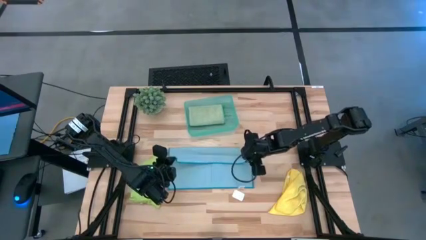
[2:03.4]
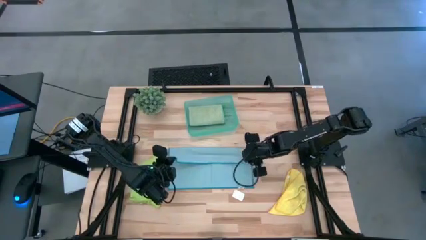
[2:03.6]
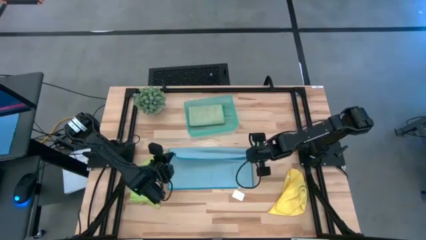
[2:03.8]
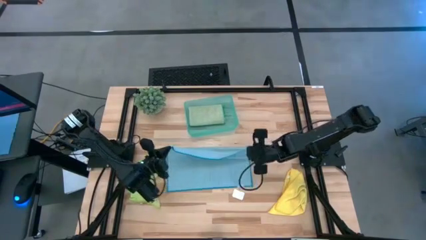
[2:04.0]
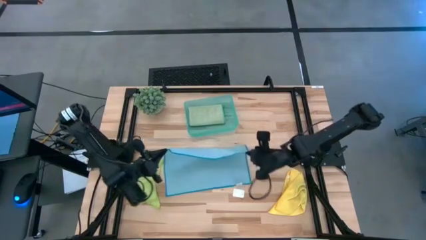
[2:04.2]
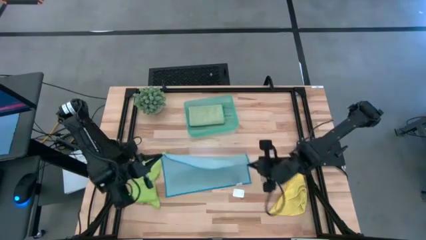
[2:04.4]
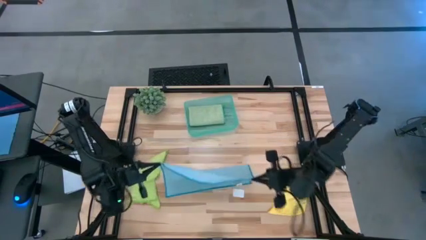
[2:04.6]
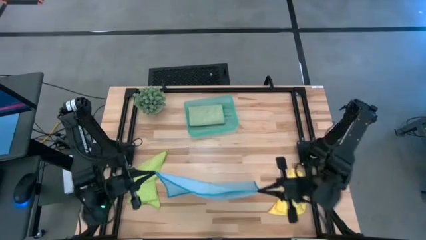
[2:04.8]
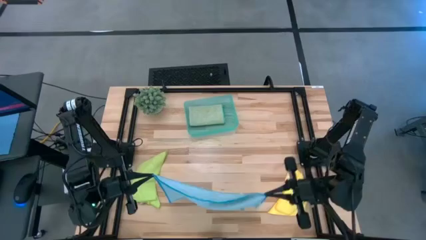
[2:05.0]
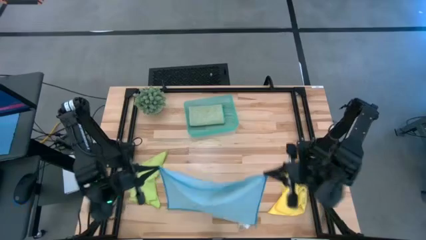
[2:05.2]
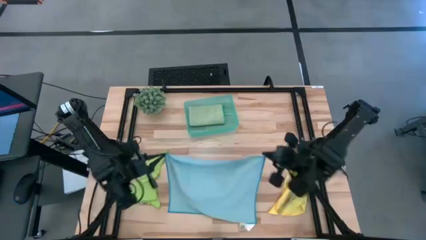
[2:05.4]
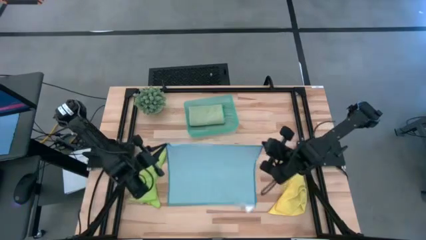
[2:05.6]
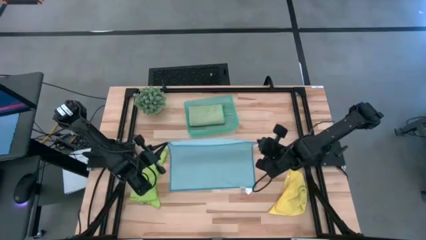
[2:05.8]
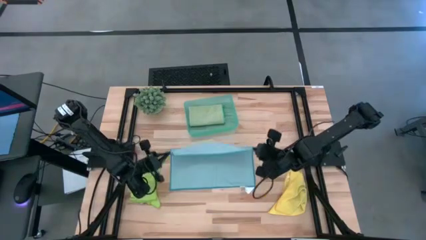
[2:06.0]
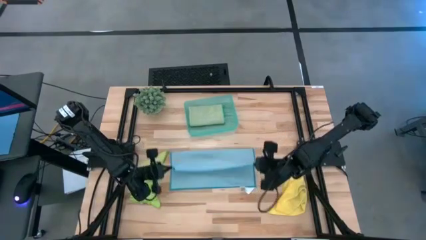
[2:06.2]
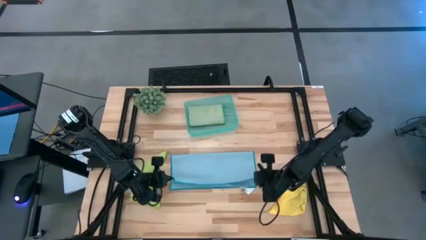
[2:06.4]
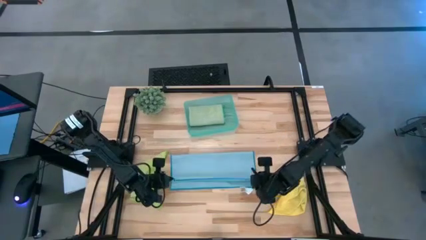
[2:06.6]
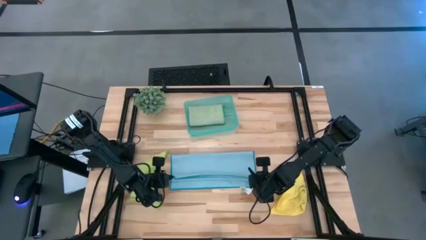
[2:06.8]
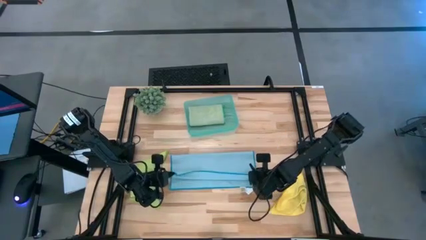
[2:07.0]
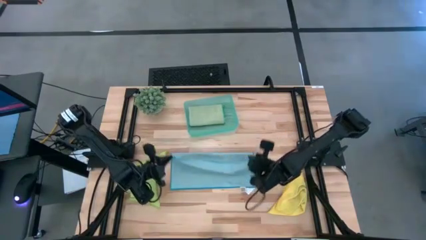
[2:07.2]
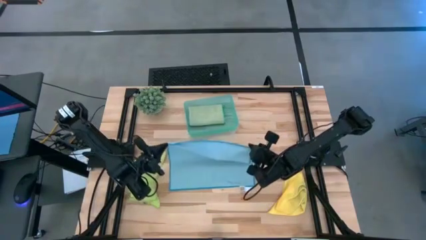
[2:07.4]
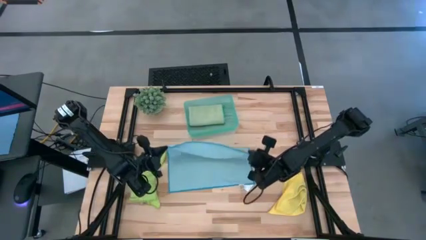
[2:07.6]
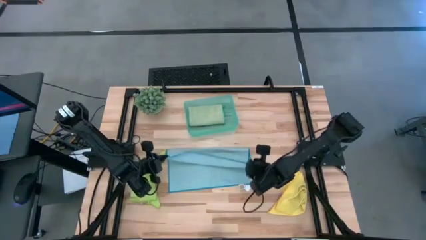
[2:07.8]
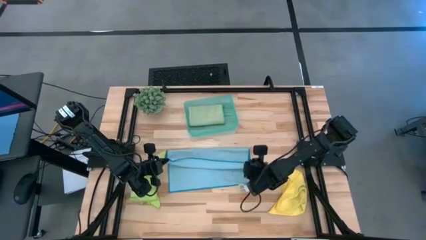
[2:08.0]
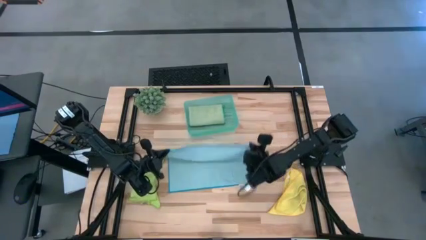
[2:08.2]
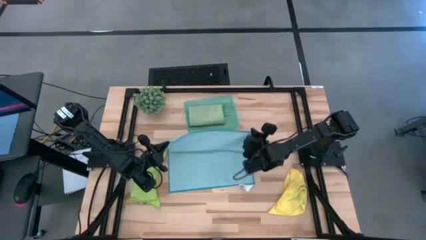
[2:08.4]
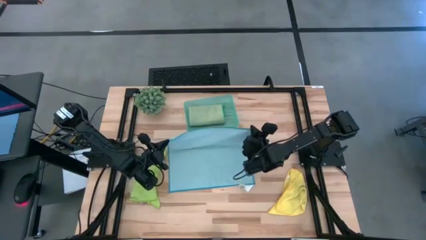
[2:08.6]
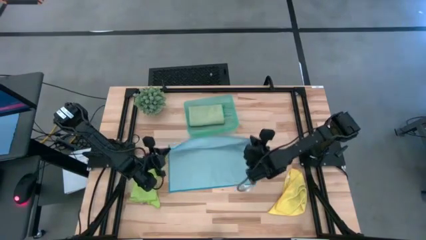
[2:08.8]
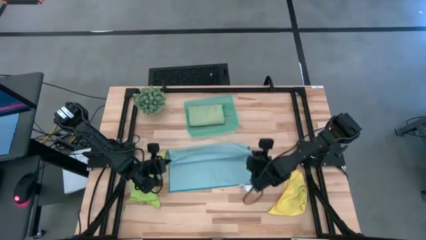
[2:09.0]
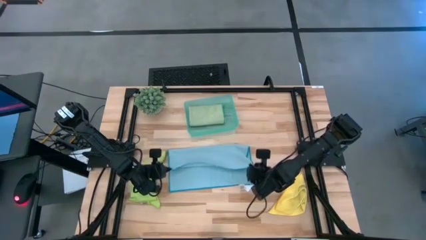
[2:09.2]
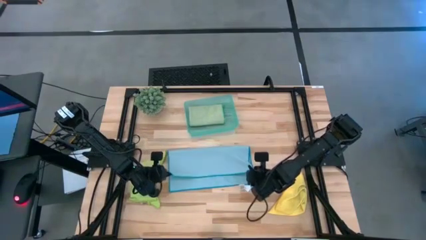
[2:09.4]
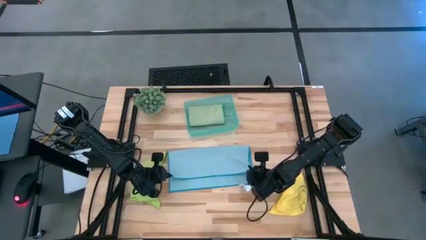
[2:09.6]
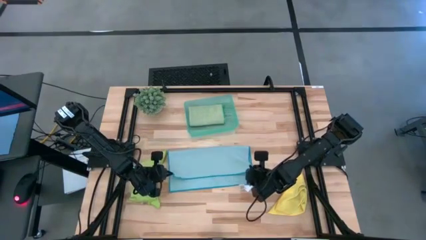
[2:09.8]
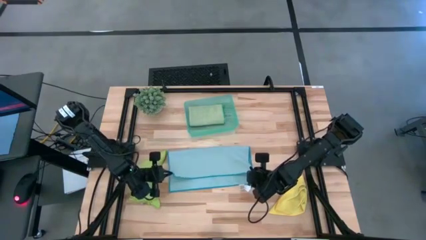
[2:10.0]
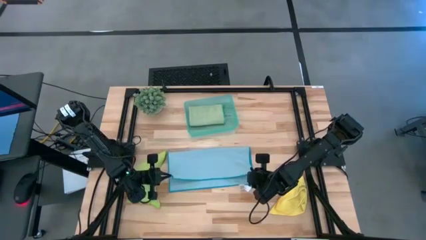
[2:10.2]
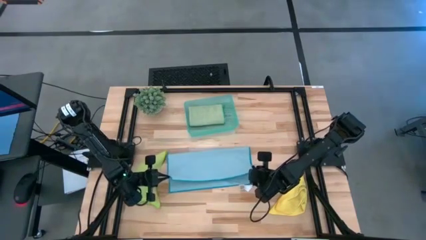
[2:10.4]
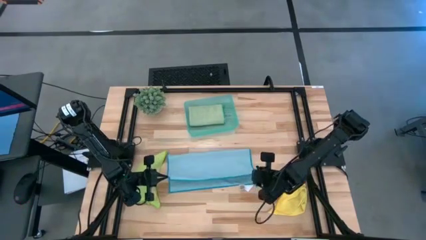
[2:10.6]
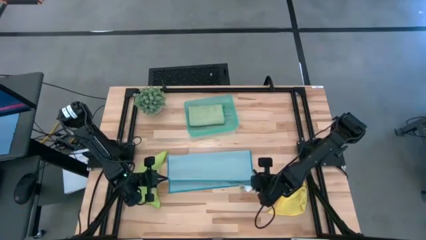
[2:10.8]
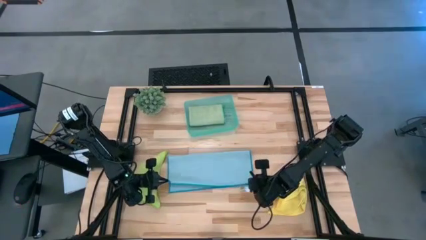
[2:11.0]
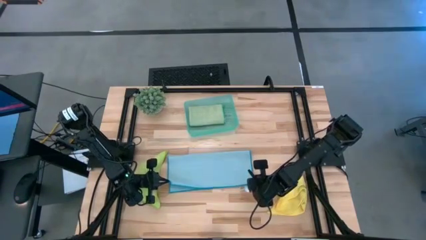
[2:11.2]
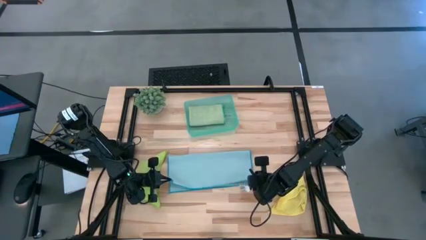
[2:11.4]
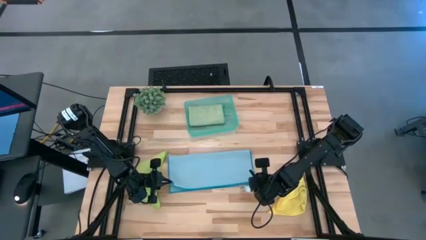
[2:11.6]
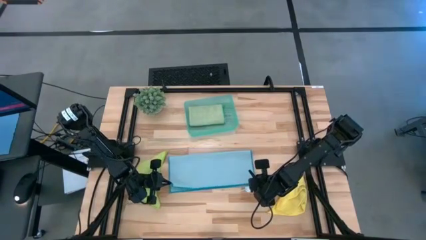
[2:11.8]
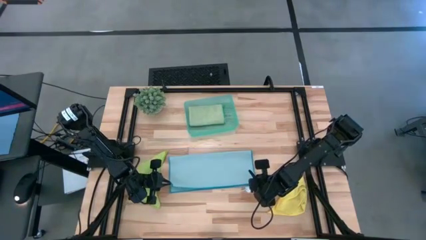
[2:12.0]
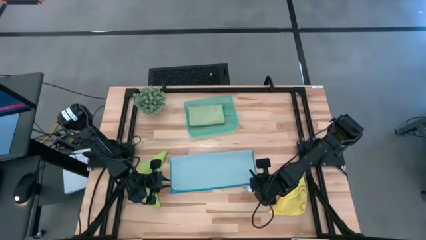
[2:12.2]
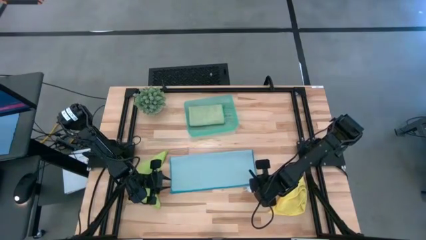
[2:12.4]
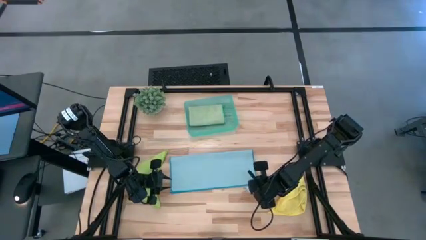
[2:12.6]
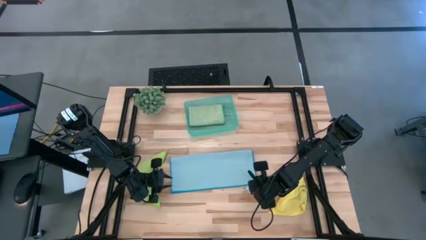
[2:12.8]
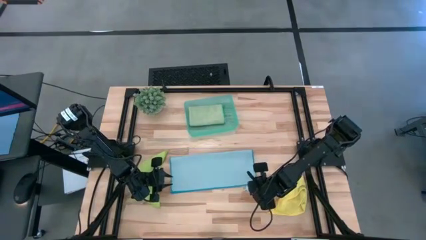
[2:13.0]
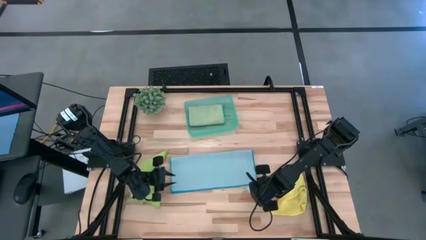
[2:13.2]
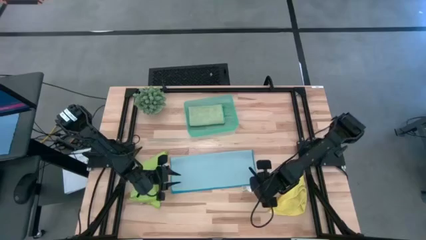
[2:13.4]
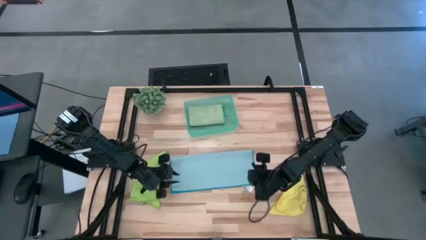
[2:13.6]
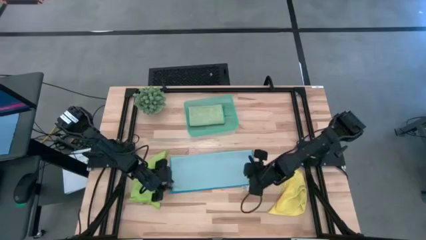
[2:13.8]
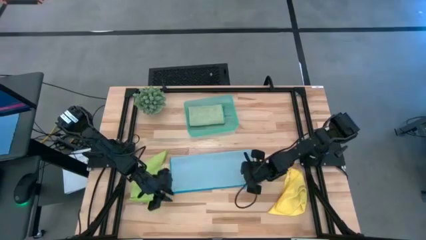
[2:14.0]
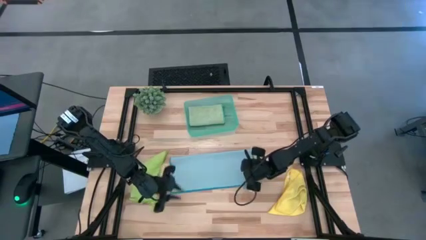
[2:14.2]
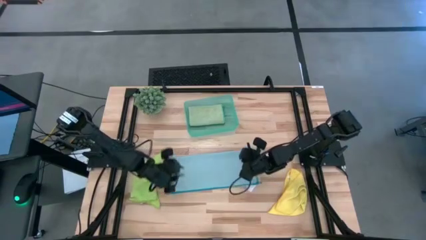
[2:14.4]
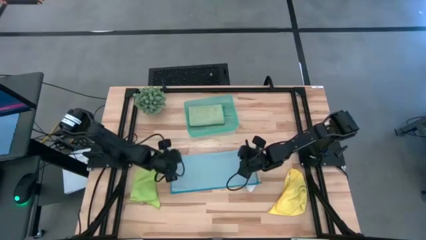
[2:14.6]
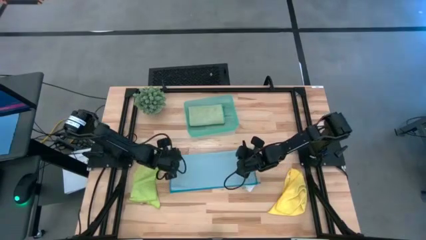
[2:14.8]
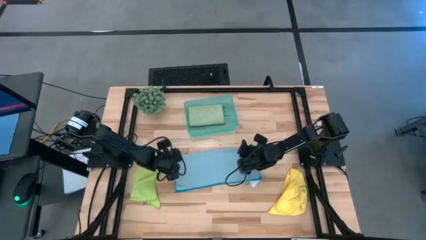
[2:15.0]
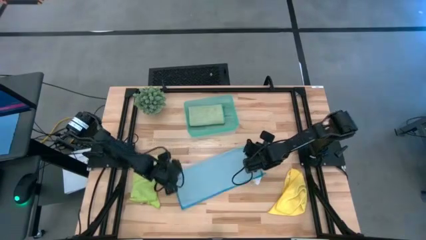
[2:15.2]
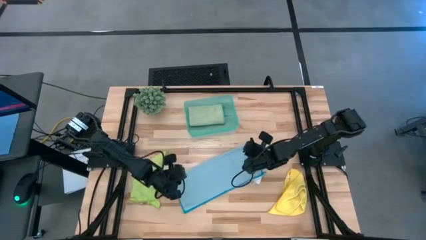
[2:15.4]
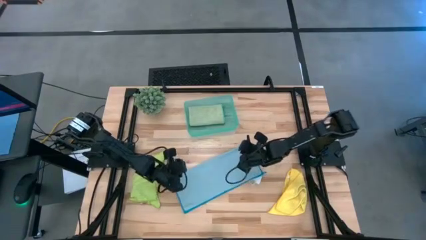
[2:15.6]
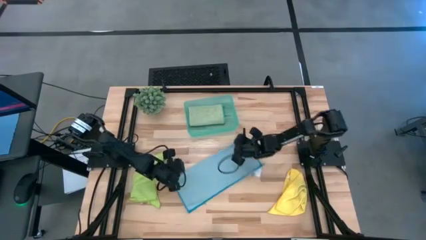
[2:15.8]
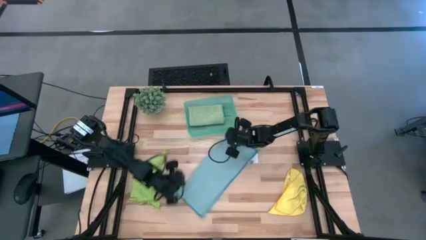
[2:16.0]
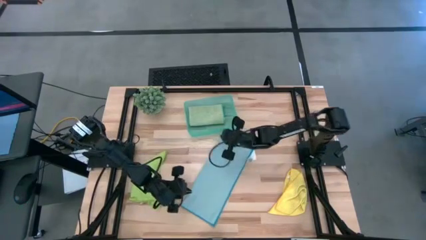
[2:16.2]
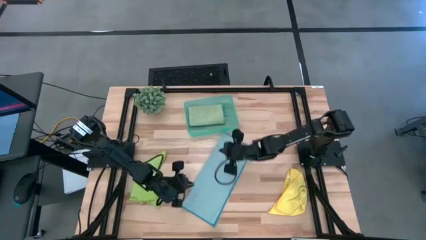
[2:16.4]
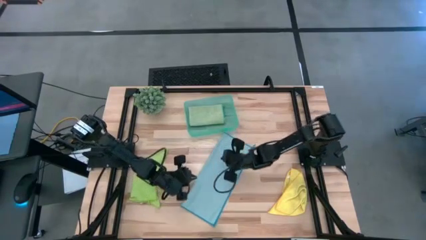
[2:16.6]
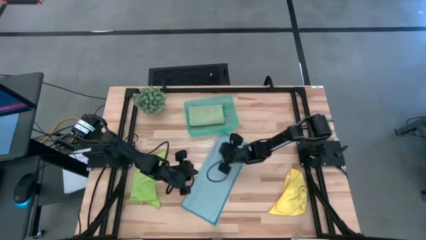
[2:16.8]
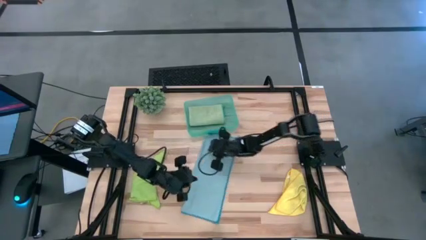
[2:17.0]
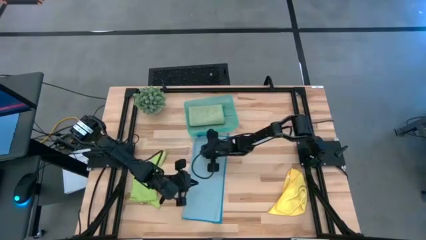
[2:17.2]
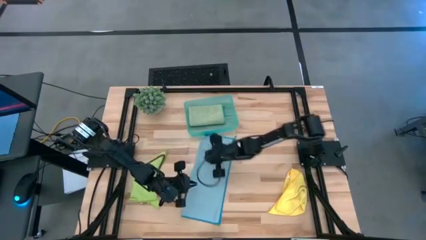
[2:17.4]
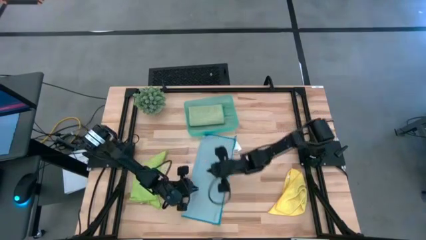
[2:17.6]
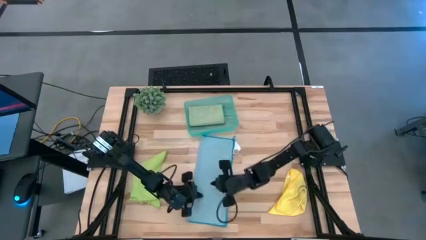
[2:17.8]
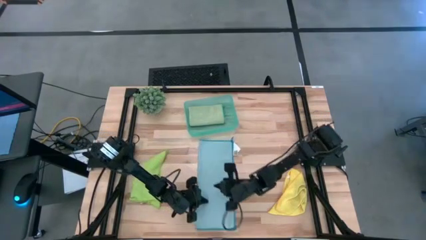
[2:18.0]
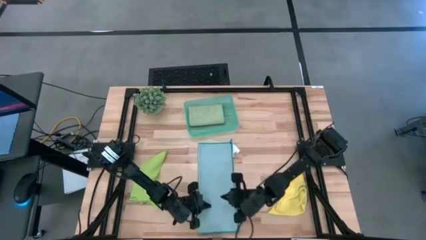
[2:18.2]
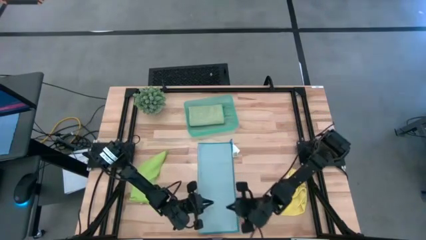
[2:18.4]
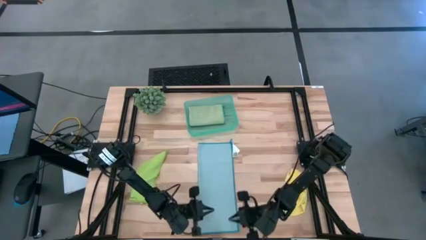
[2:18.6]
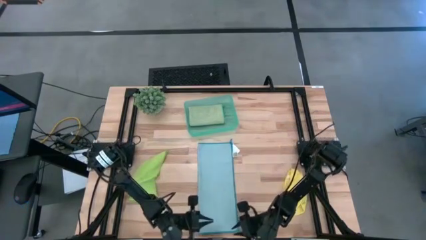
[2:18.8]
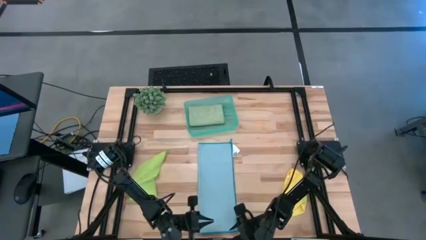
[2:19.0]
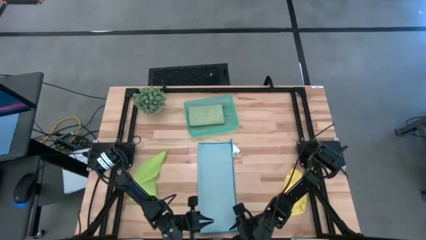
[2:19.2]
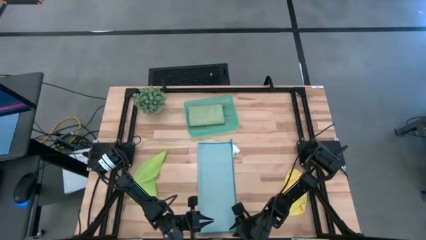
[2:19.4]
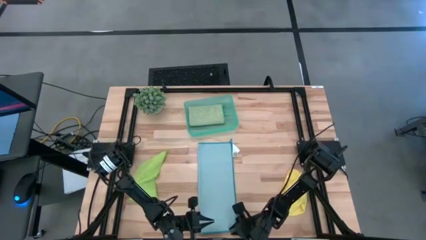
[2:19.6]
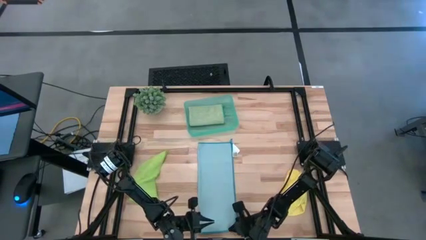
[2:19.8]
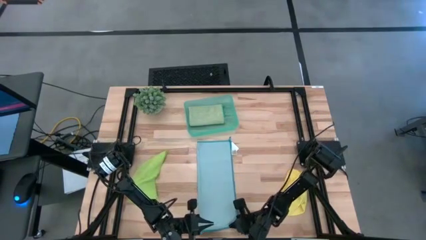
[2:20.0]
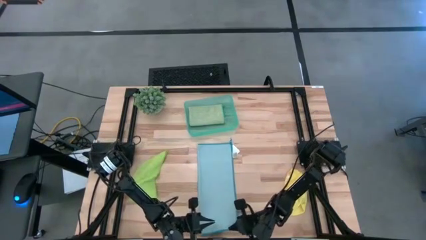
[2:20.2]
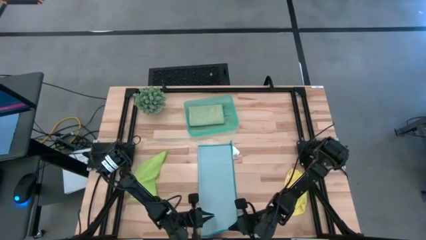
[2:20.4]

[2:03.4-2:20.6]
Task: Fold microfiber towels
Fold the blue towel
